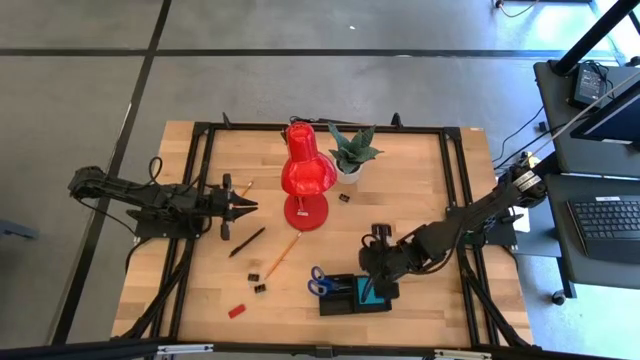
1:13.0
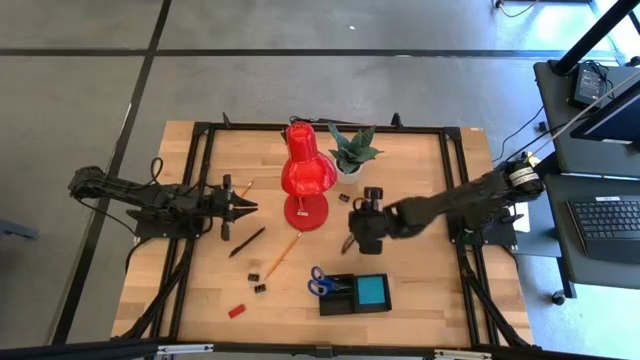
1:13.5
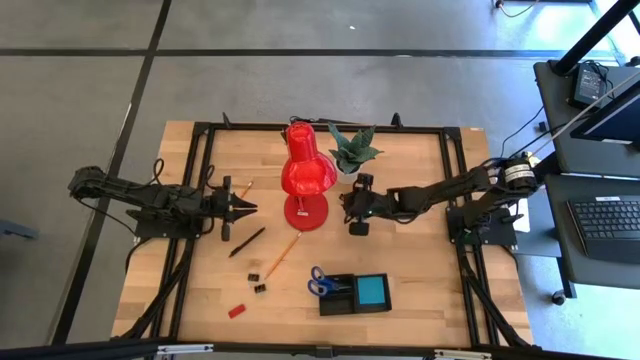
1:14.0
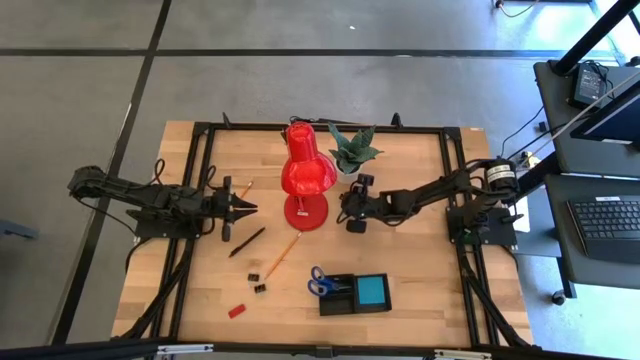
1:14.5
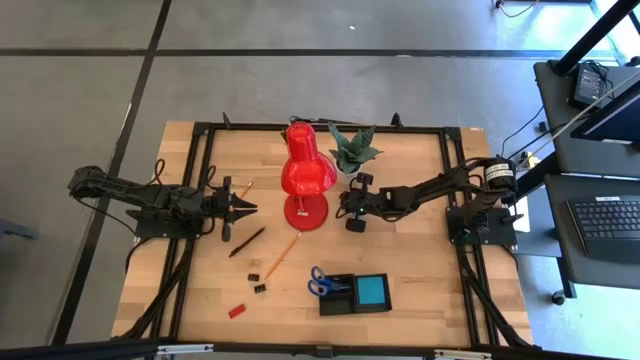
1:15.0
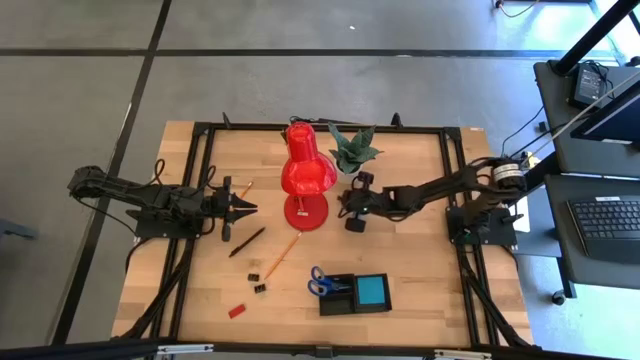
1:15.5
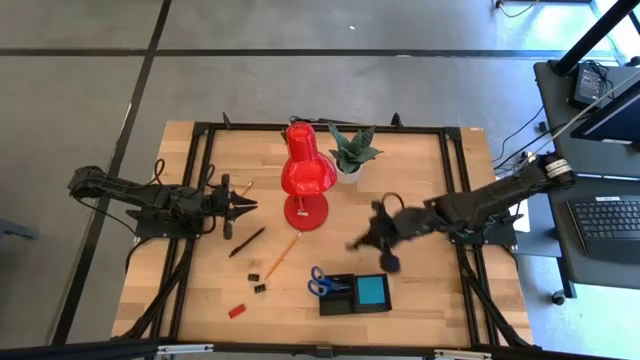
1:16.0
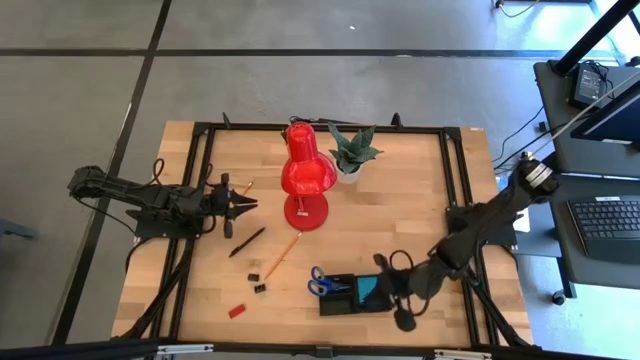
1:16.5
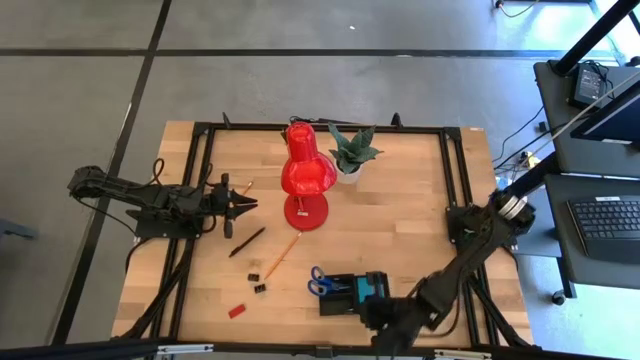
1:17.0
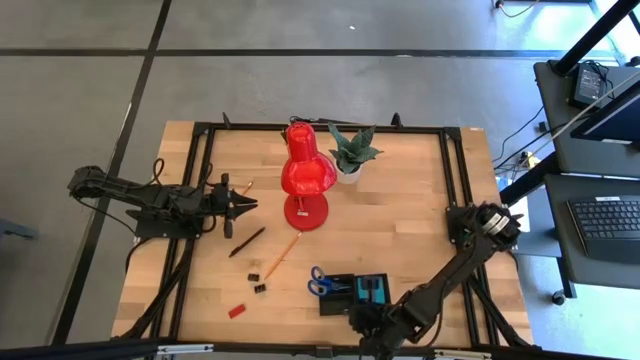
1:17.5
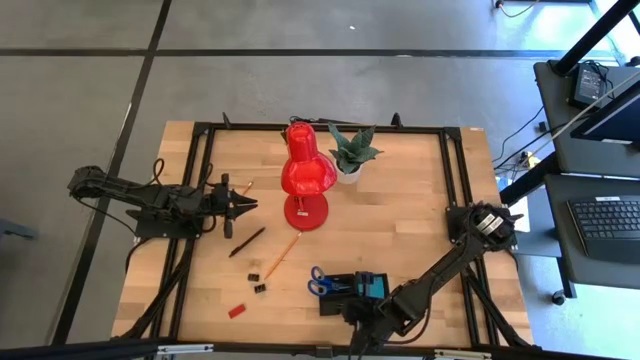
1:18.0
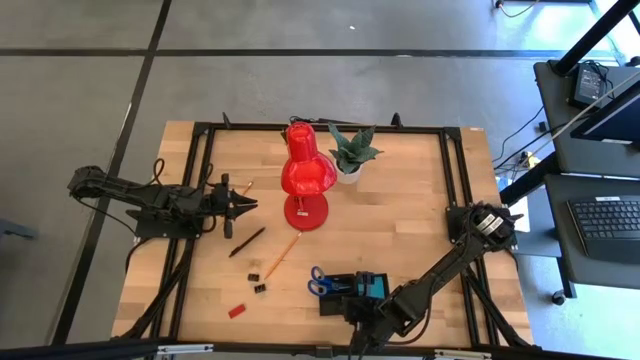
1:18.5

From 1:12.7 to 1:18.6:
Task: Pick and place office supplies into organizer
Put the top black binder clip into the black desk organizer

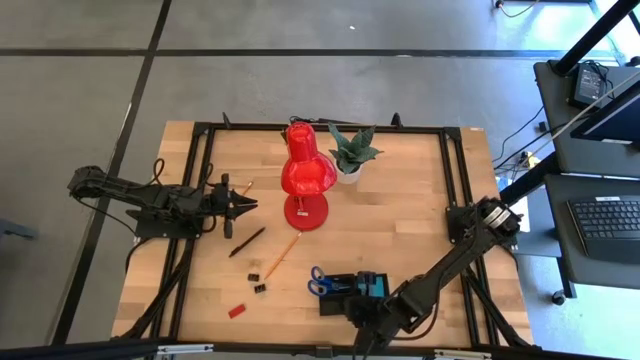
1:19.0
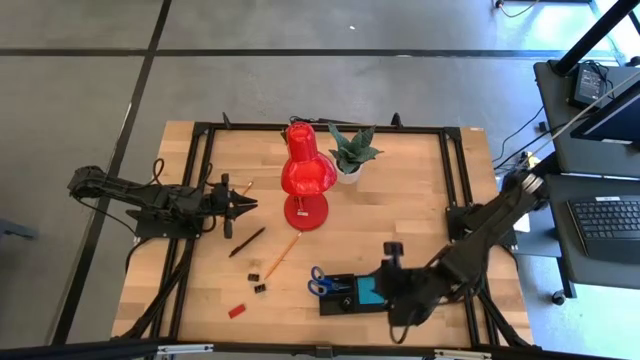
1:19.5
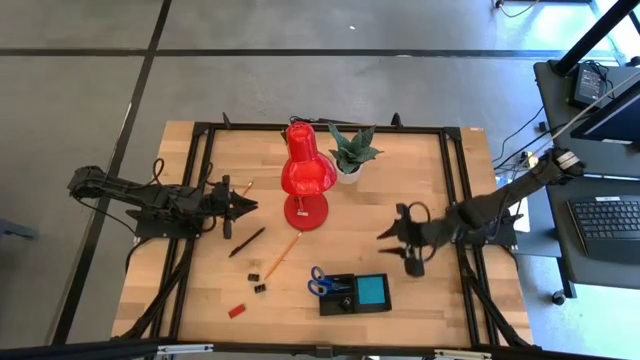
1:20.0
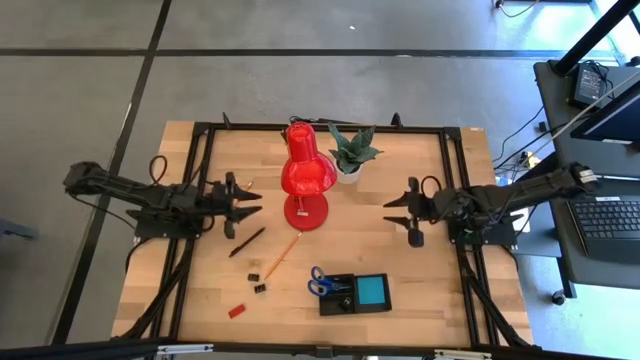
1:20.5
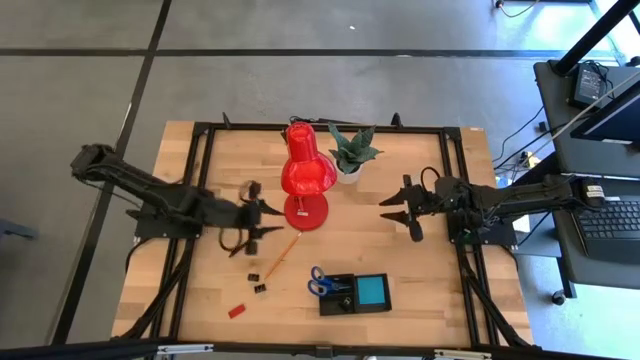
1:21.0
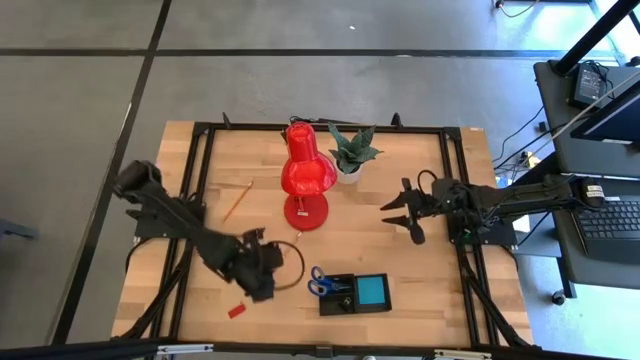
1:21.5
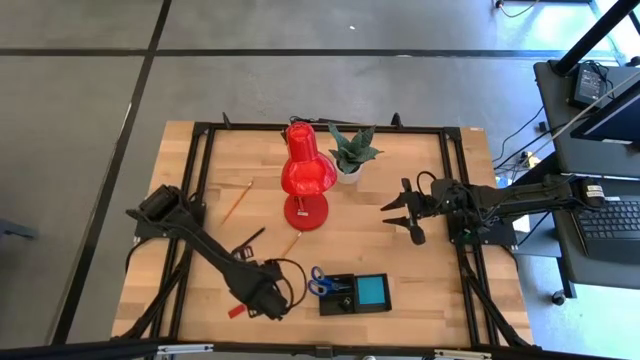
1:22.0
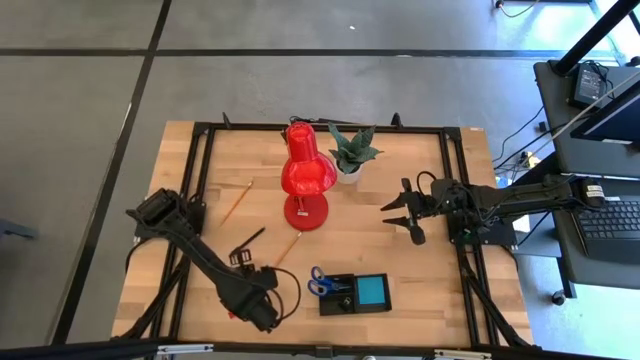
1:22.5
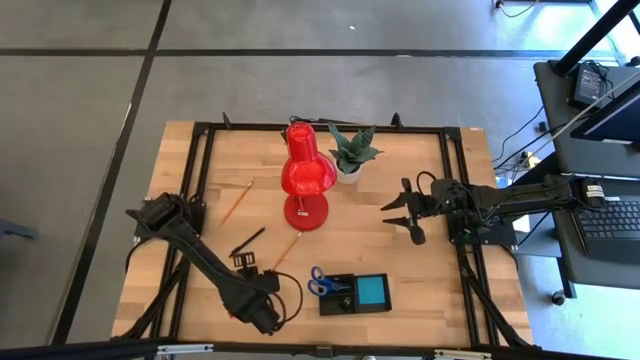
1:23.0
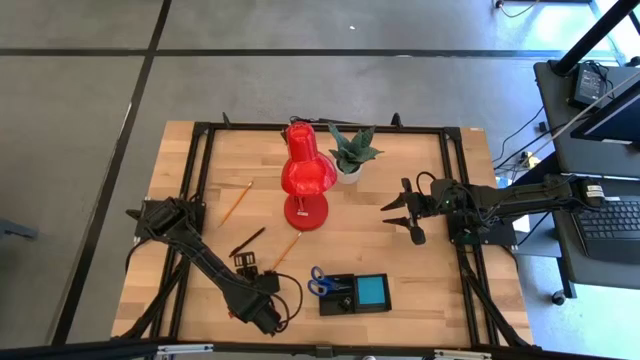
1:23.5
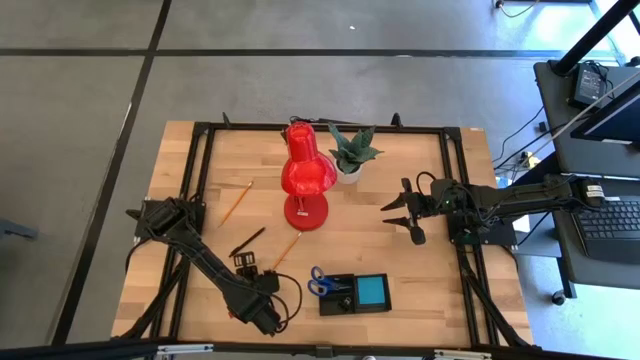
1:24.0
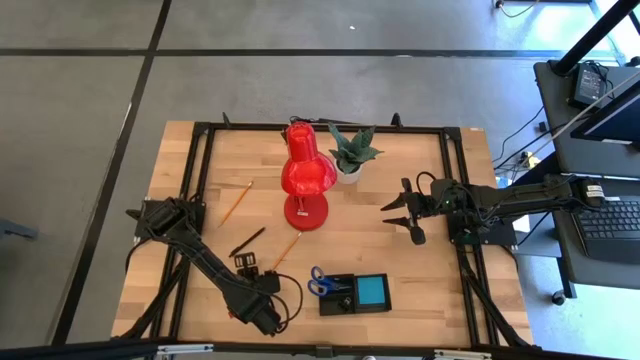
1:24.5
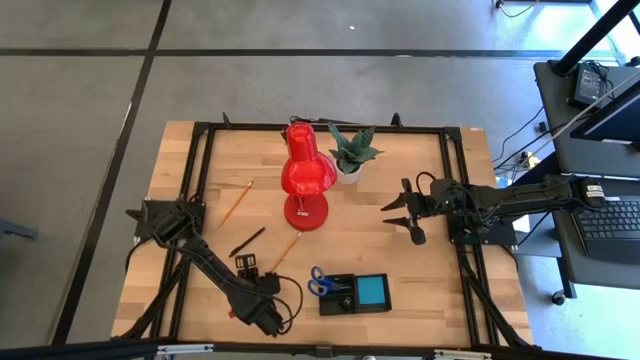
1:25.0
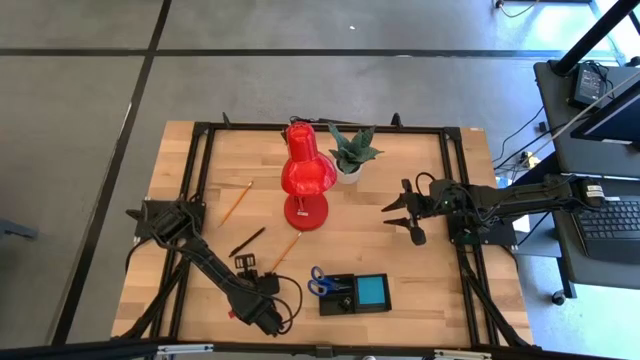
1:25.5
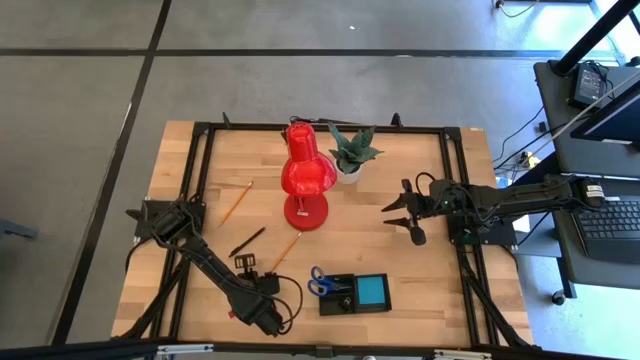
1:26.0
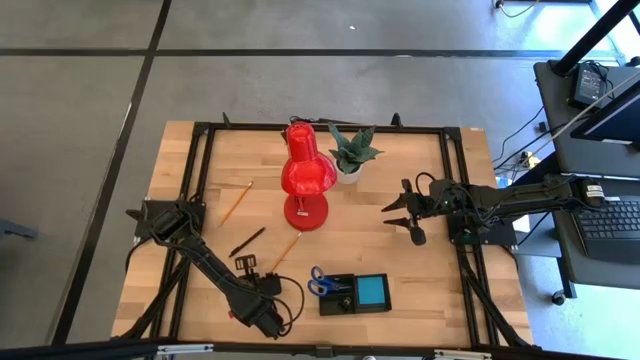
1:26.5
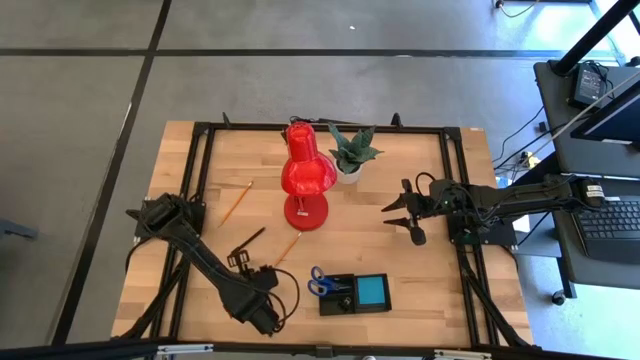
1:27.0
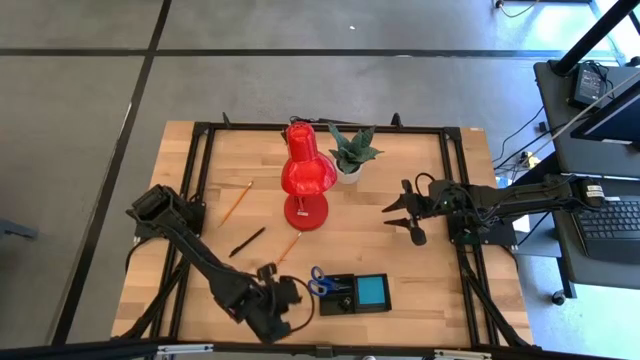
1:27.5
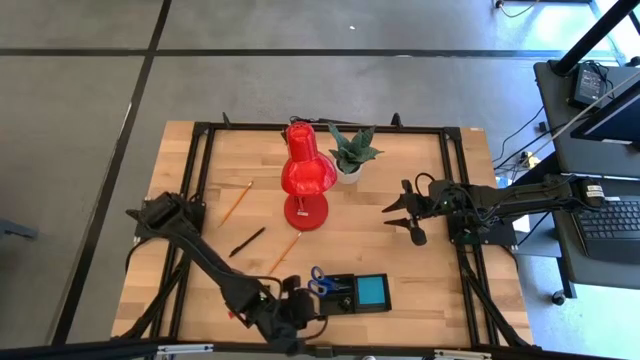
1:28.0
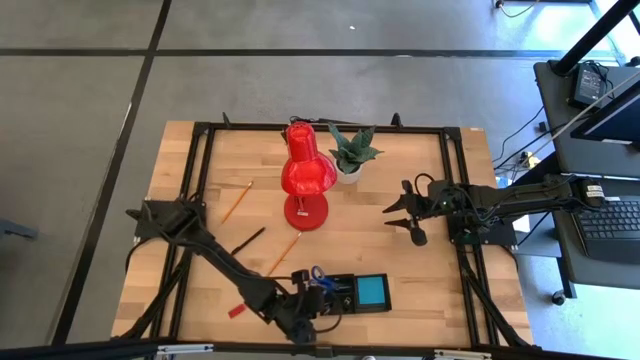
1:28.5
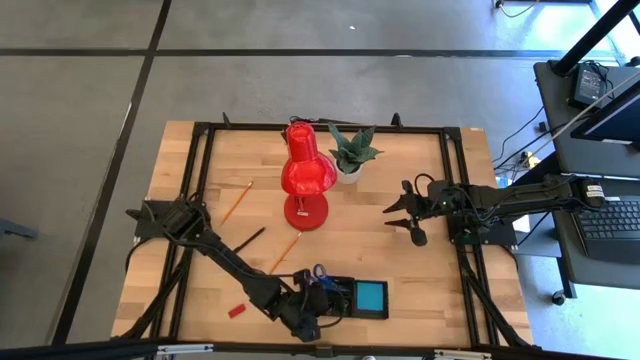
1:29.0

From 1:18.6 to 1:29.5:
Put the top black binder clip into the black desk organizer

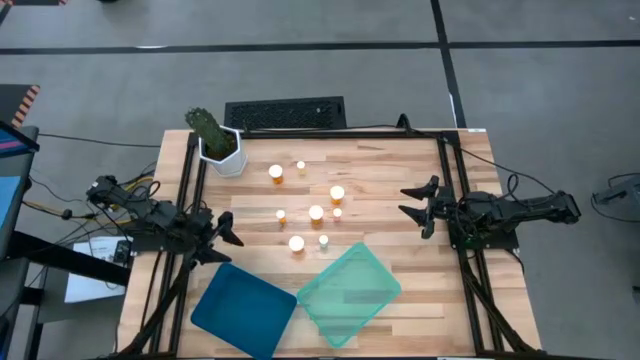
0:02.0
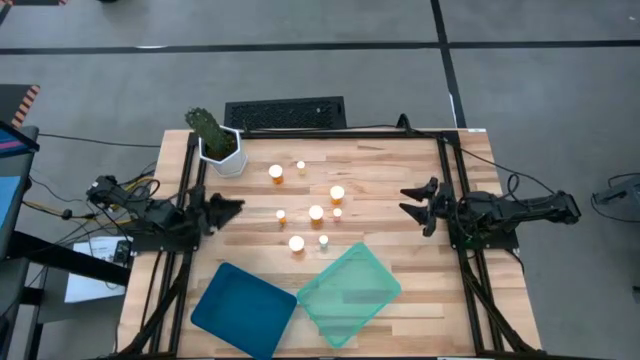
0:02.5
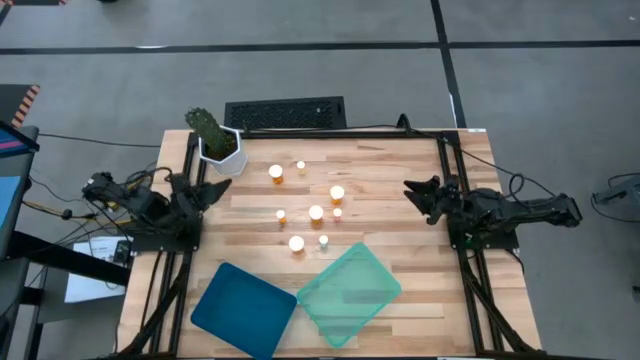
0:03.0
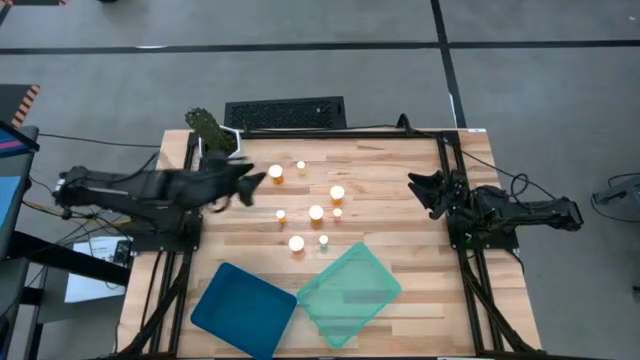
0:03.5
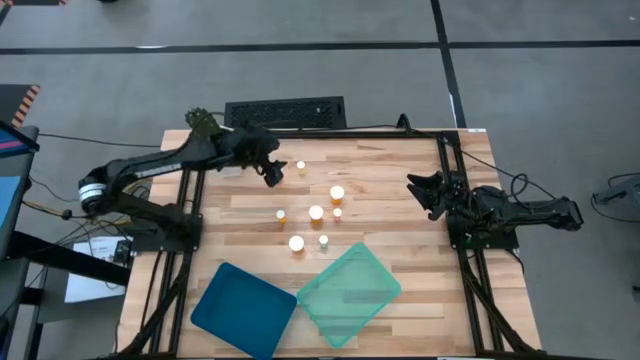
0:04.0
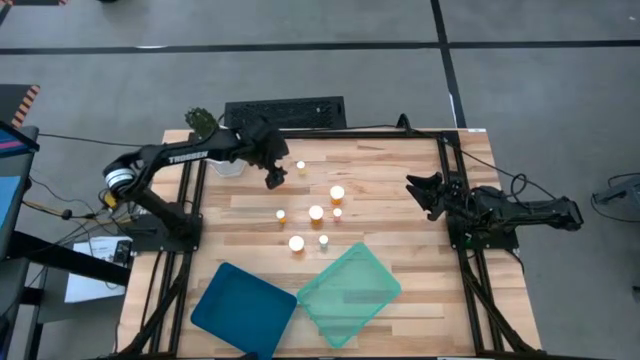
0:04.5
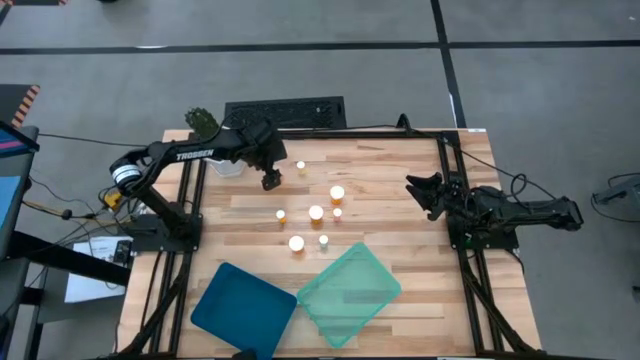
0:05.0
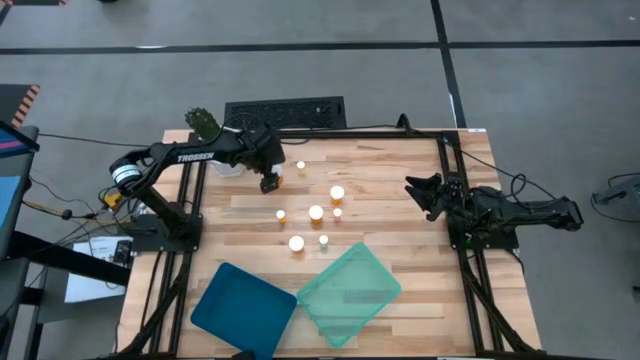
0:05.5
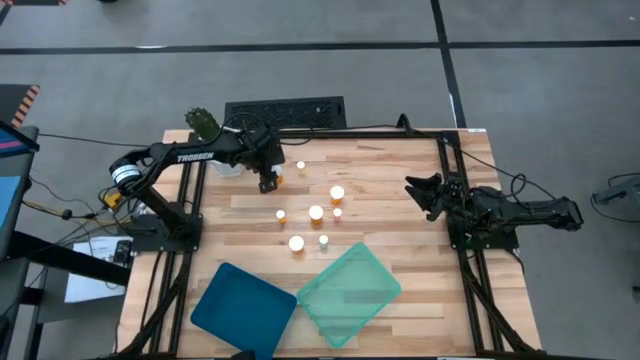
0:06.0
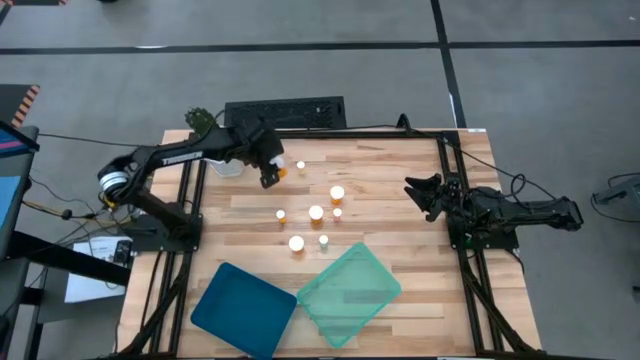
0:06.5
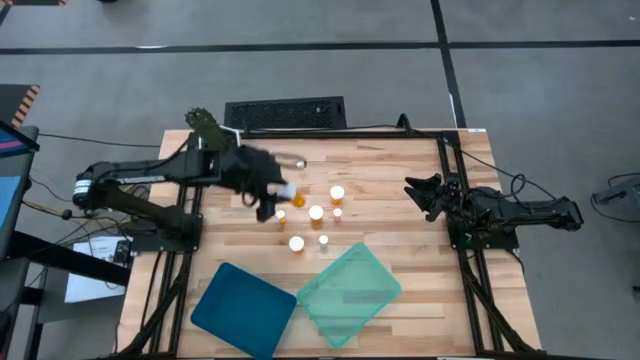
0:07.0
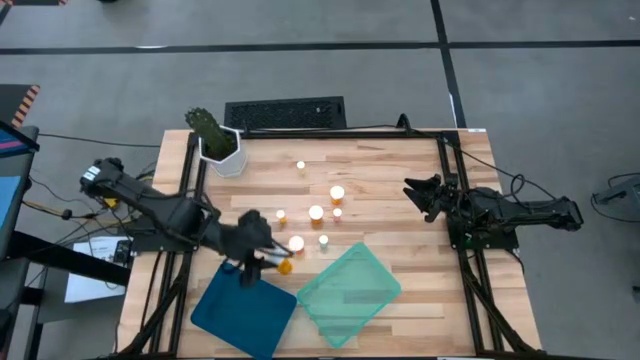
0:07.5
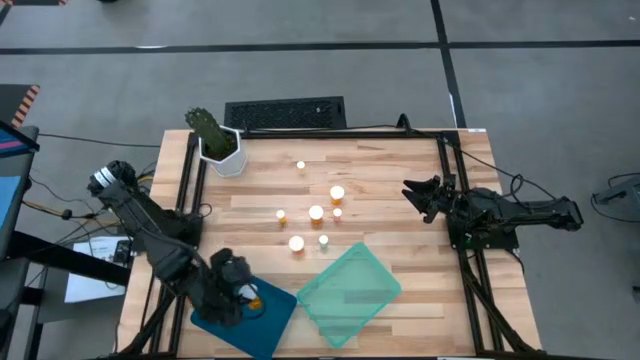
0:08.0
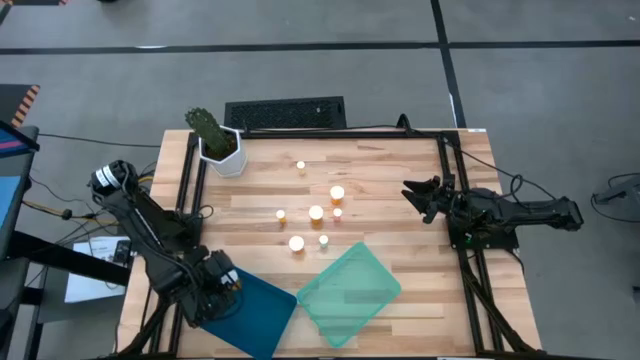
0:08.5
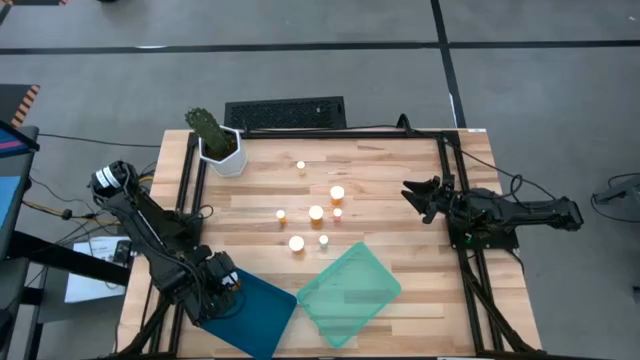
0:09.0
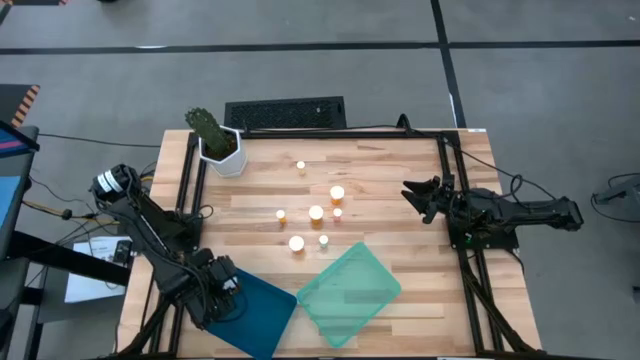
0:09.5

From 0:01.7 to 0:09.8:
Task: Pick and place medicine bottles into bin by pill shape (circle, oval)
Put the big orange pill bottle into the blue bin
